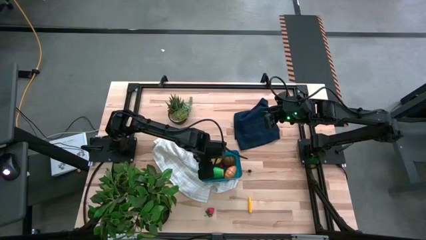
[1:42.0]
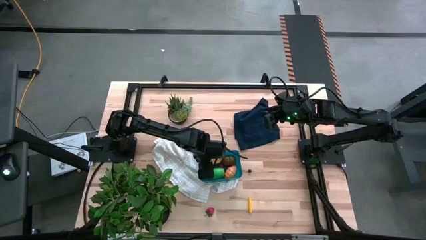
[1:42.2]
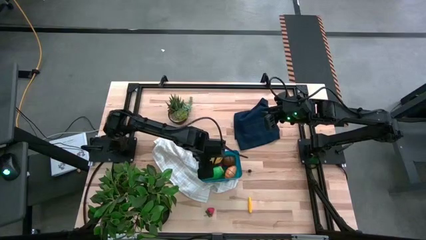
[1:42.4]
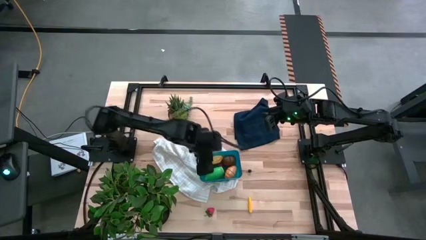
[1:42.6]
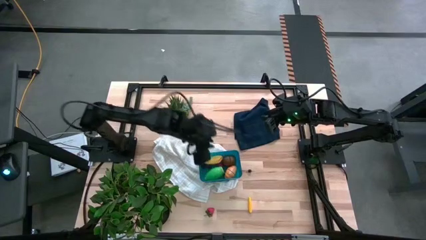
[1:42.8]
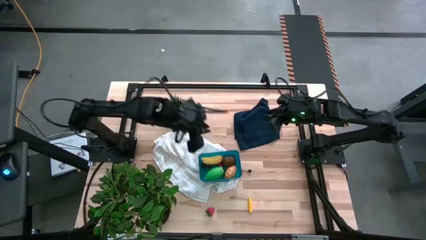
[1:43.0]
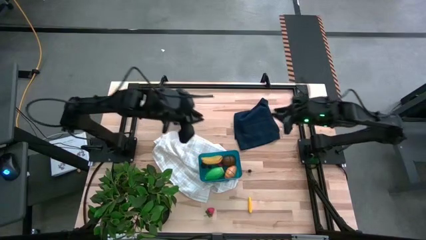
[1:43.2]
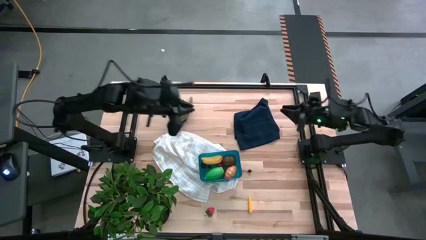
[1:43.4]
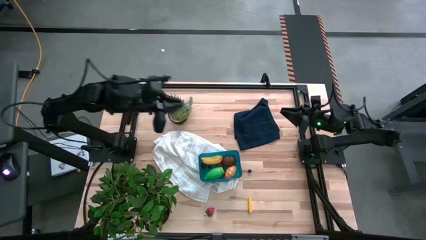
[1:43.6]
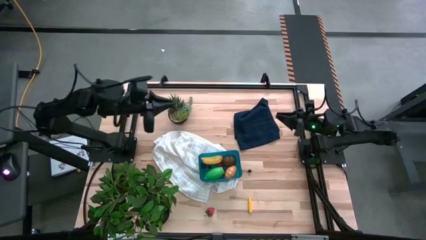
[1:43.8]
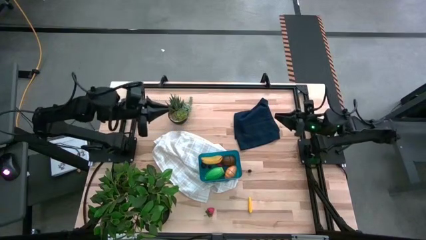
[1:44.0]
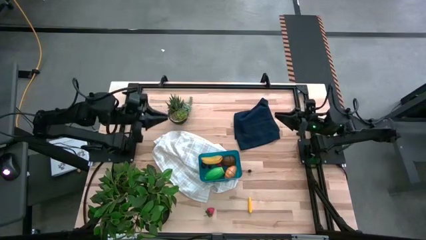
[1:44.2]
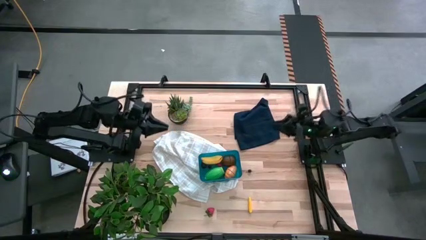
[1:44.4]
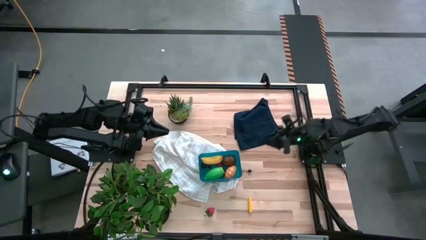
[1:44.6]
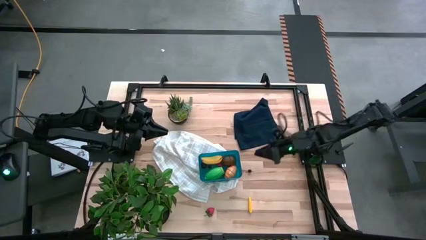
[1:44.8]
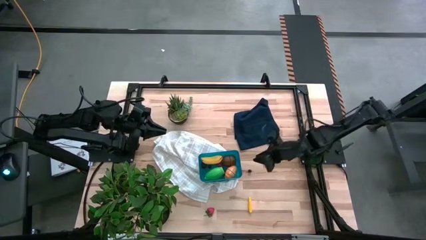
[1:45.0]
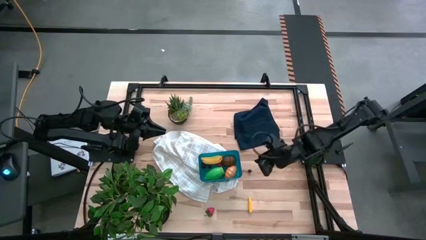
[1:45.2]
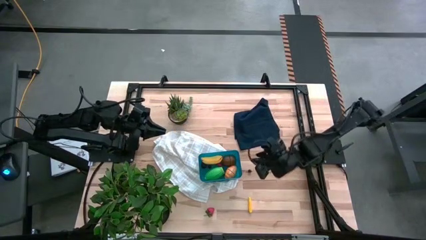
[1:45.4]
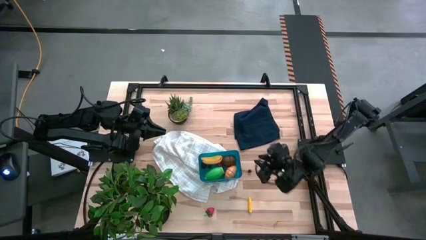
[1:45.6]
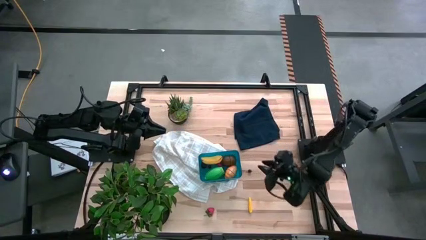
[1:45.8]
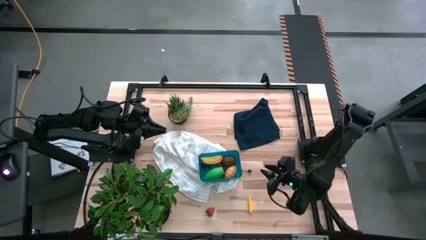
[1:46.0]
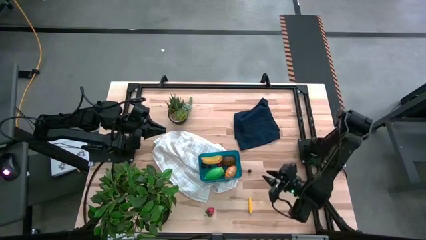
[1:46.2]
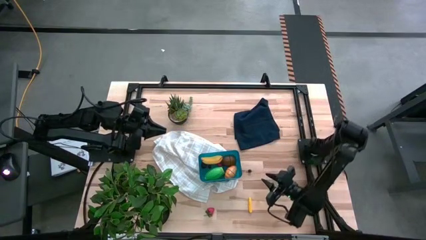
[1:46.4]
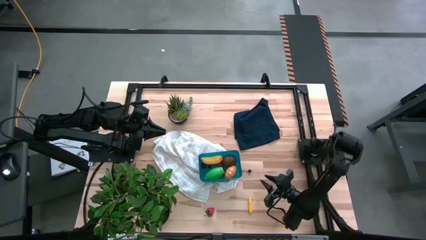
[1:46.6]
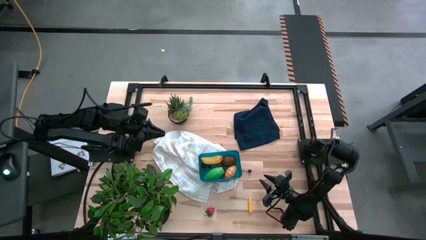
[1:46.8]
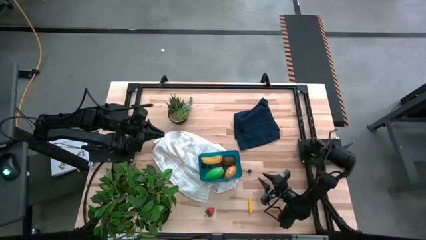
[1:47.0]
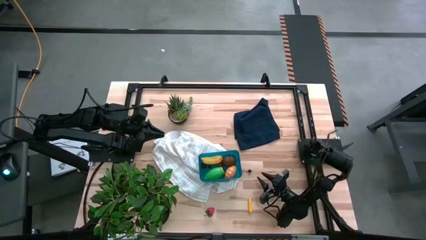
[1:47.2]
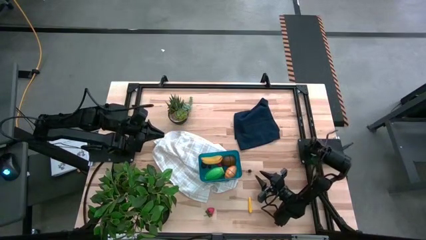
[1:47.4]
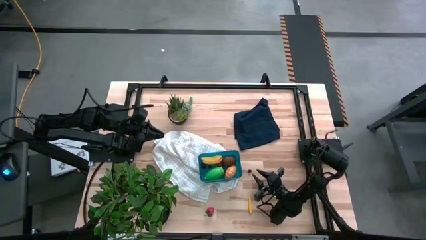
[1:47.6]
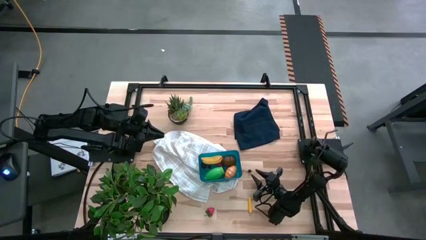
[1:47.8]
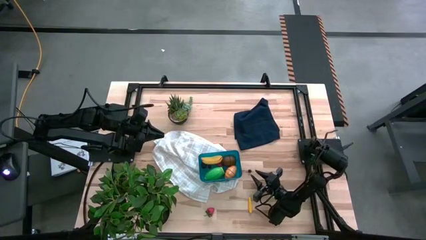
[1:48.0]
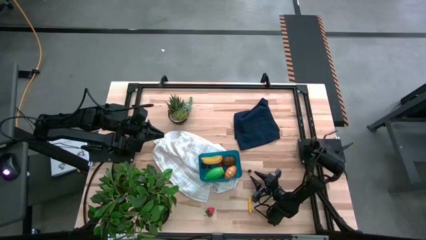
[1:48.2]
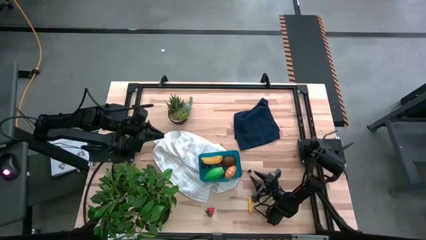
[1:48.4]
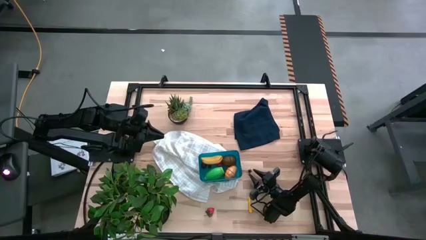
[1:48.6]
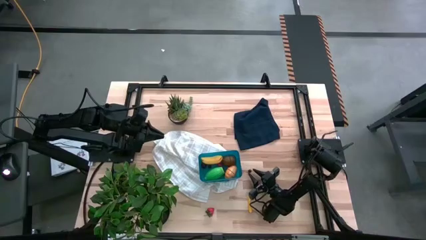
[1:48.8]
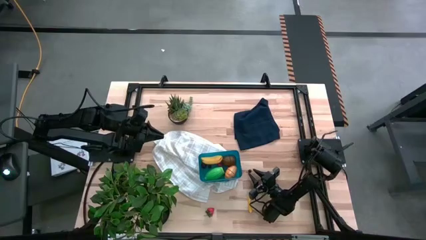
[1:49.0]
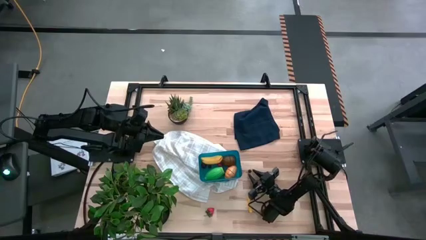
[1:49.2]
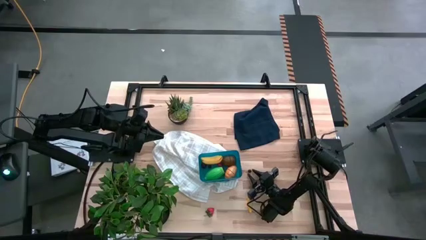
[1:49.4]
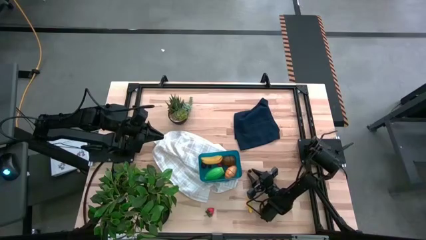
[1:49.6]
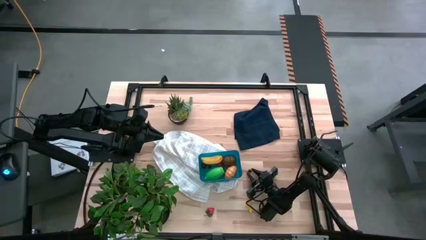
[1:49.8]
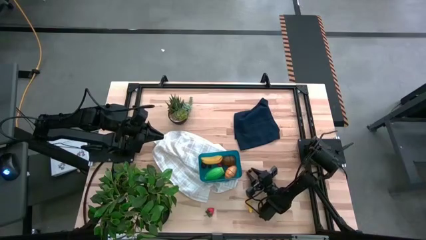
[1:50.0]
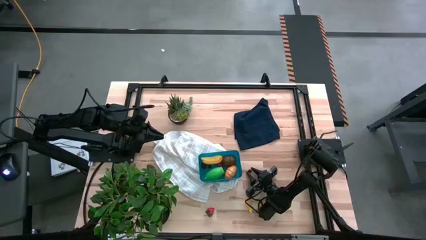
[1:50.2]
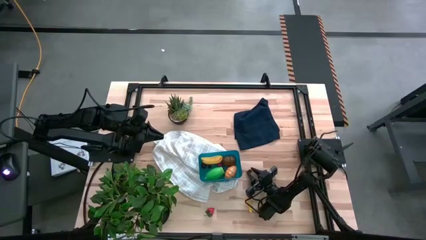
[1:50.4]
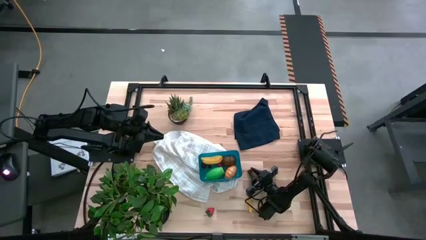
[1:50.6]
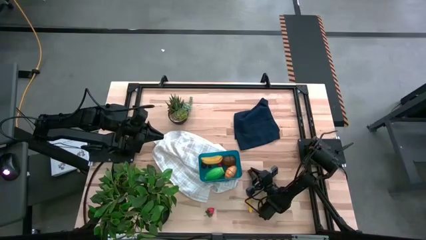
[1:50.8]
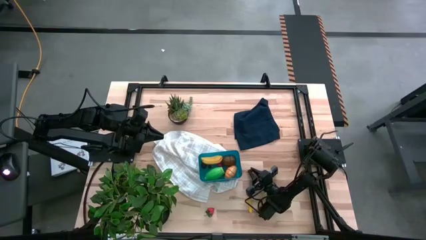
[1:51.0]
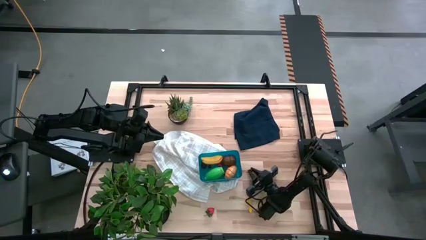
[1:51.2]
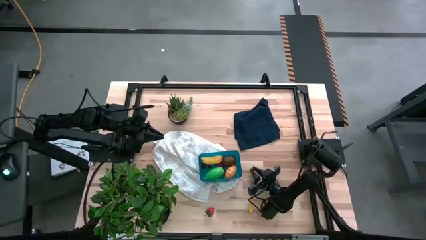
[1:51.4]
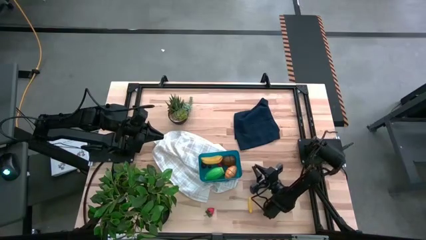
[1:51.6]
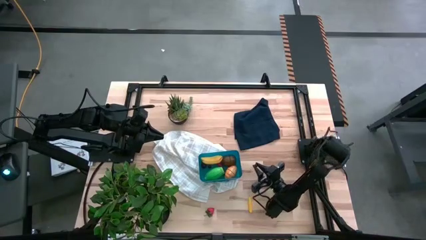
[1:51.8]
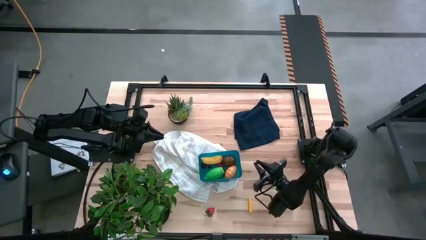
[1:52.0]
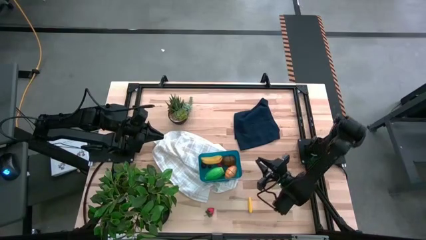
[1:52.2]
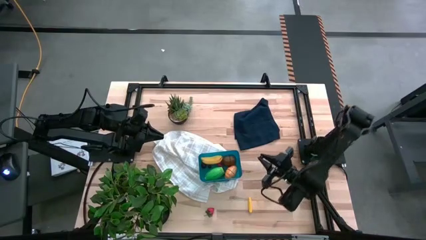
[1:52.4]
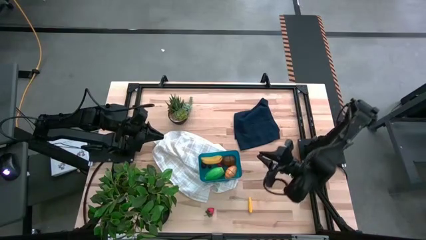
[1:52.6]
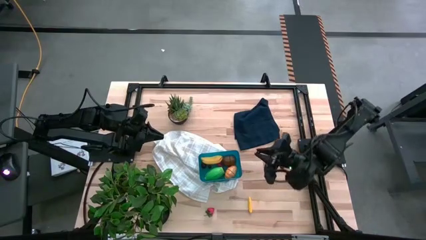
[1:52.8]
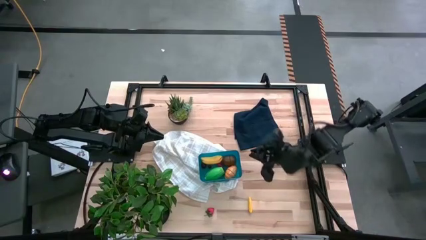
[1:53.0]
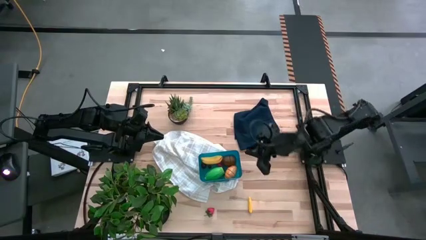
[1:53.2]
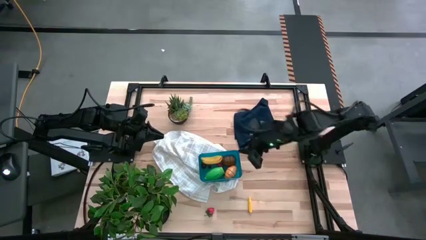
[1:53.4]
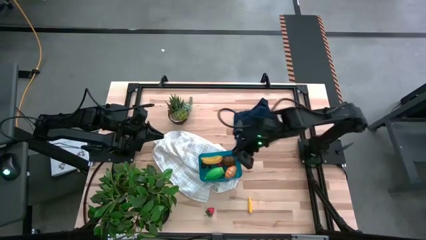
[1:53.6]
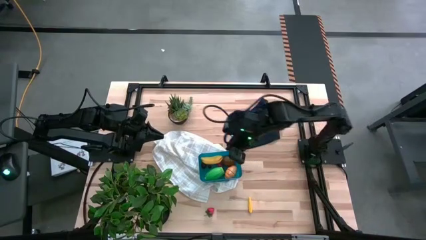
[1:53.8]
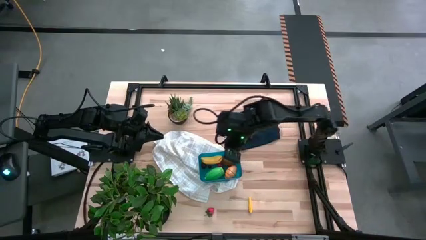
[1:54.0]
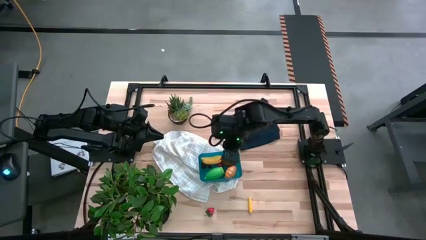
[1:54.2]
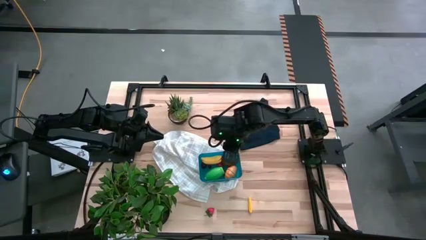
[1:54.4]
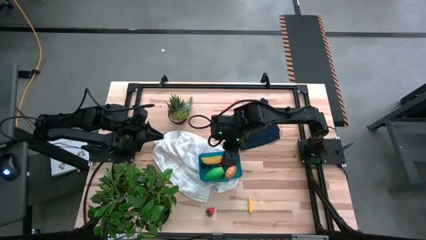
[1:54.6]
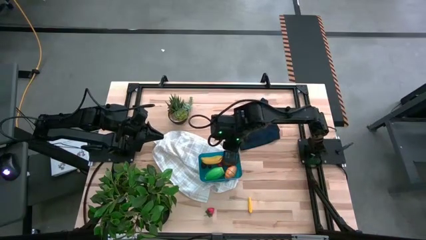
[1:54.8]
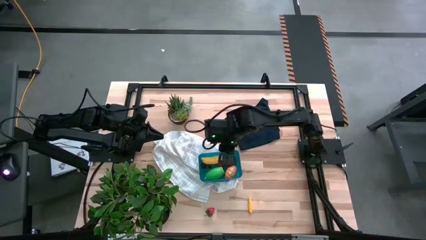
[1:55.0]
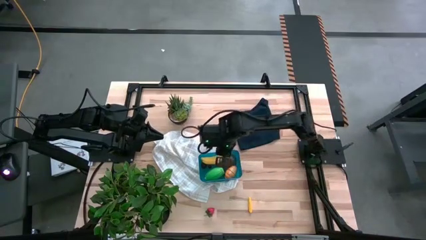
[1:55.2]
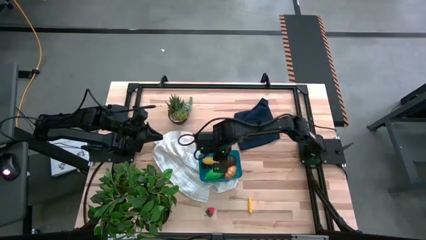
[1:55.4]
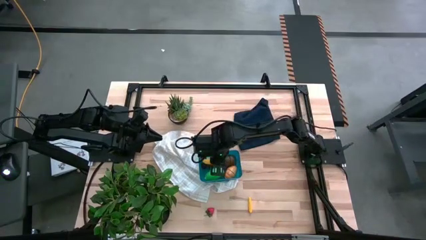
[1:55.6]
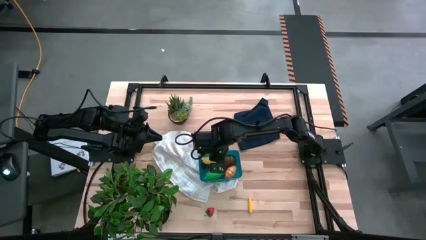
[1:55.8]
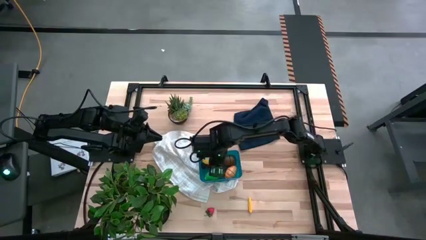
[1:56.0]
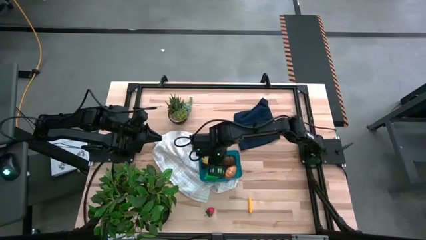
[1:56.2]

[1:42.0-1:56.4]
Task: Pick and placing Produce into tupperware
Put the blueberry into the blue bin
